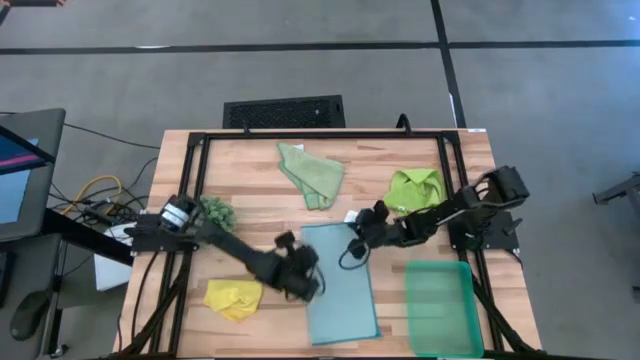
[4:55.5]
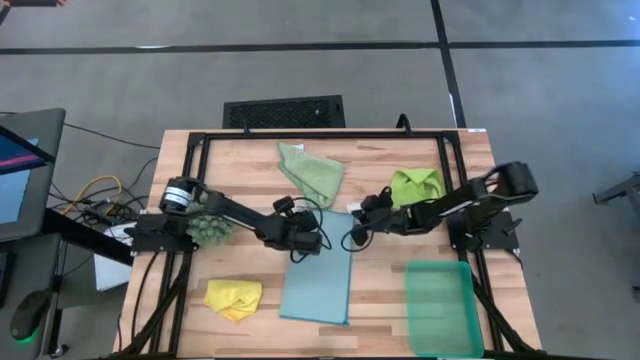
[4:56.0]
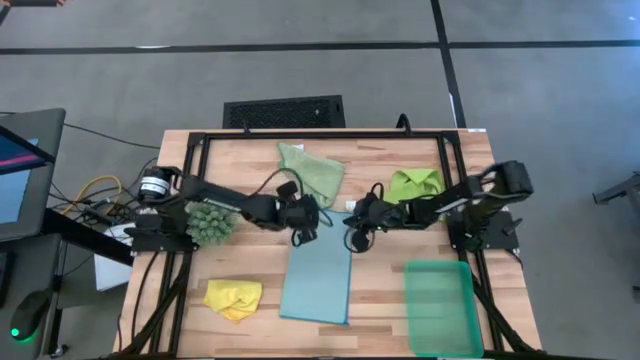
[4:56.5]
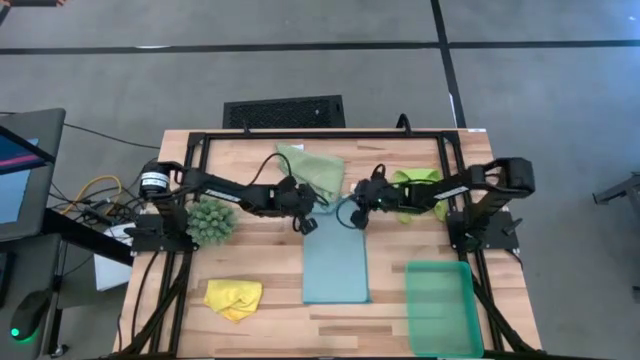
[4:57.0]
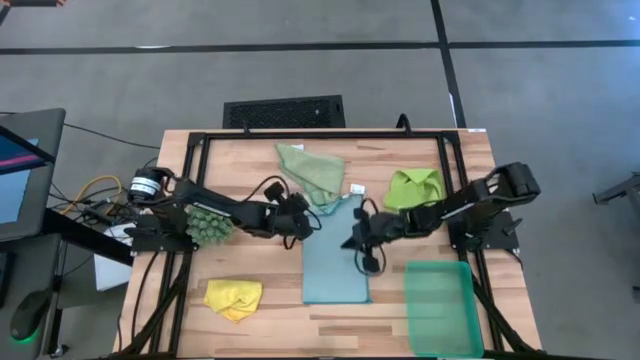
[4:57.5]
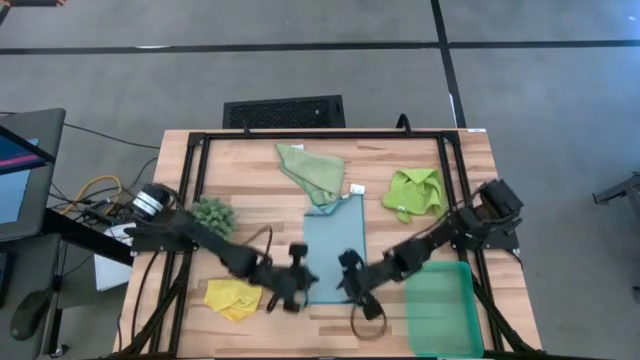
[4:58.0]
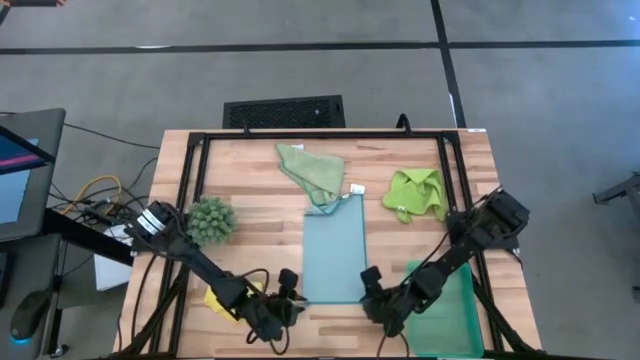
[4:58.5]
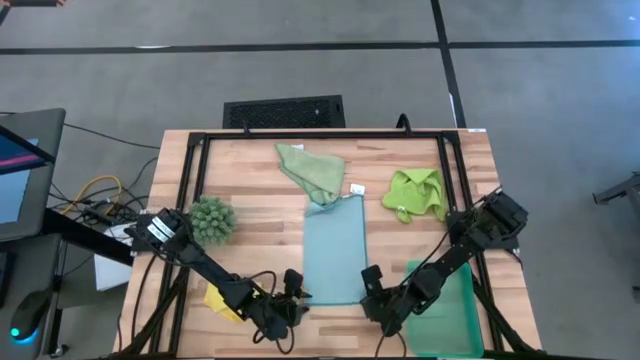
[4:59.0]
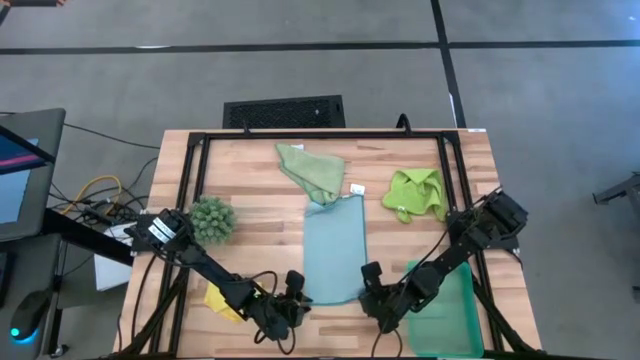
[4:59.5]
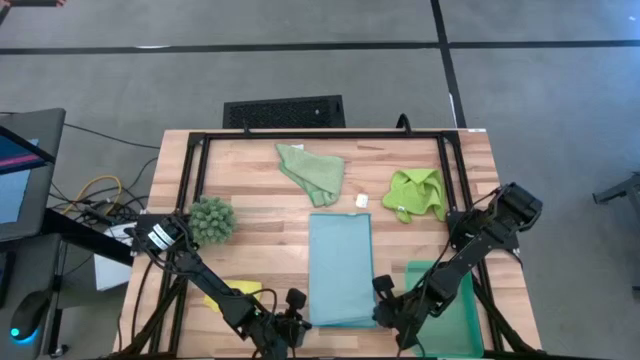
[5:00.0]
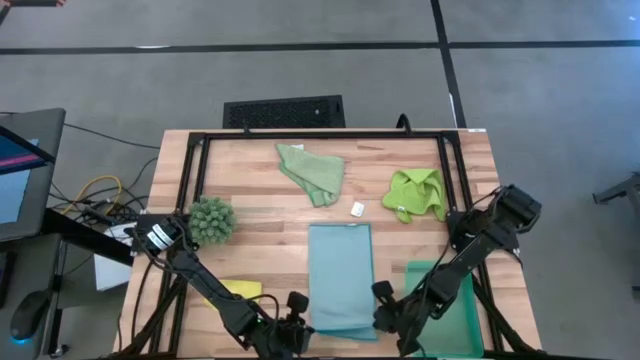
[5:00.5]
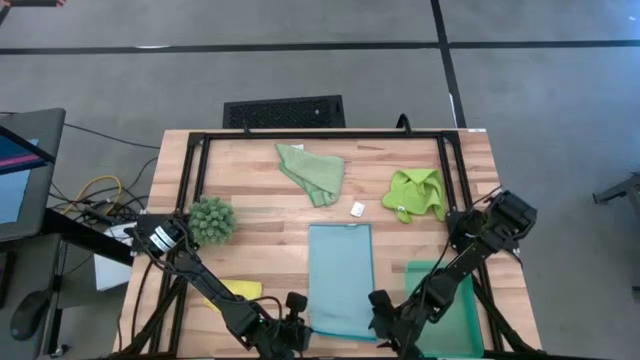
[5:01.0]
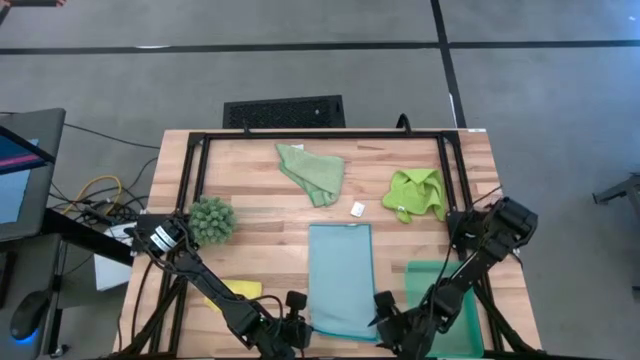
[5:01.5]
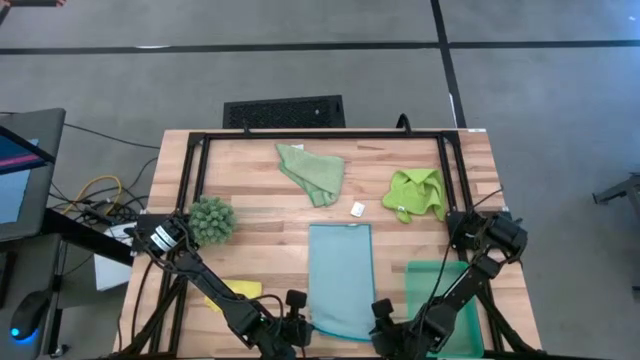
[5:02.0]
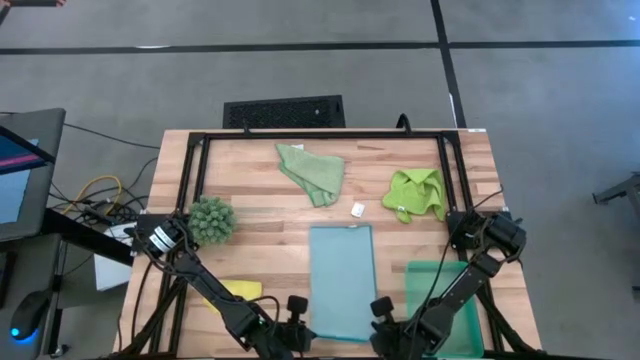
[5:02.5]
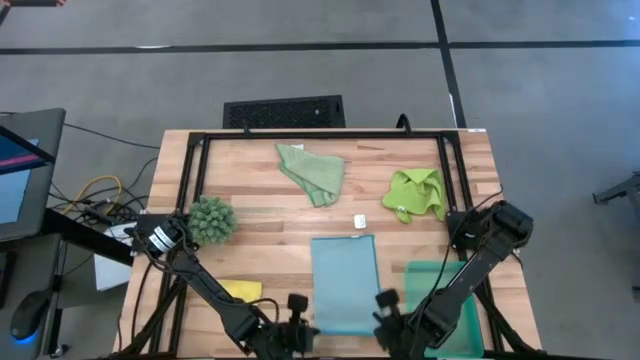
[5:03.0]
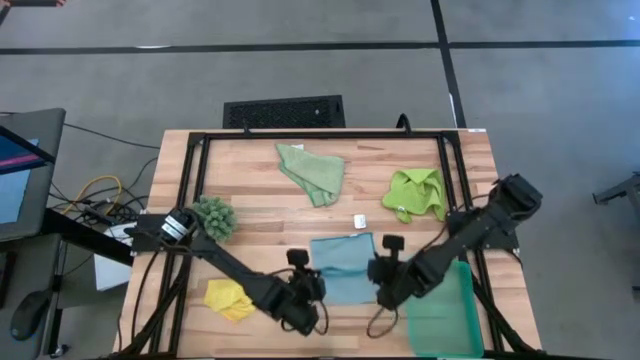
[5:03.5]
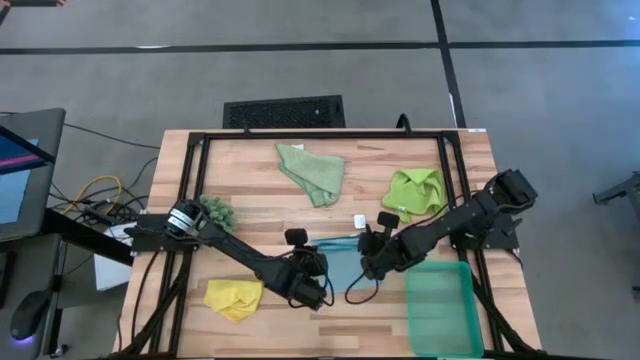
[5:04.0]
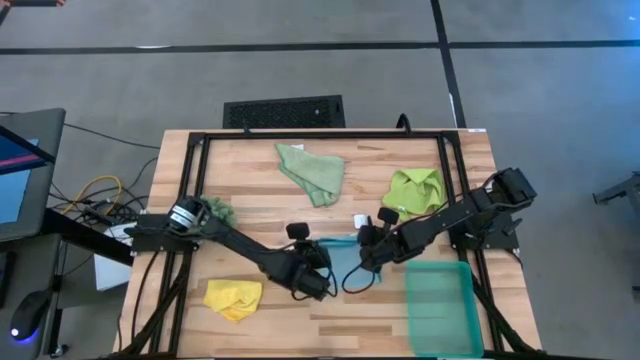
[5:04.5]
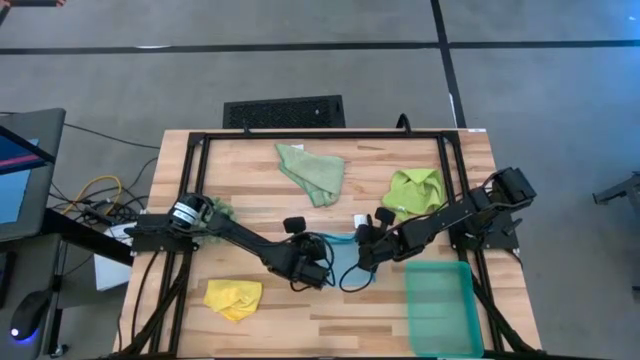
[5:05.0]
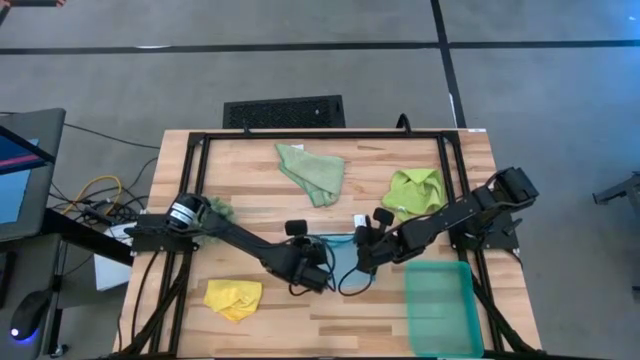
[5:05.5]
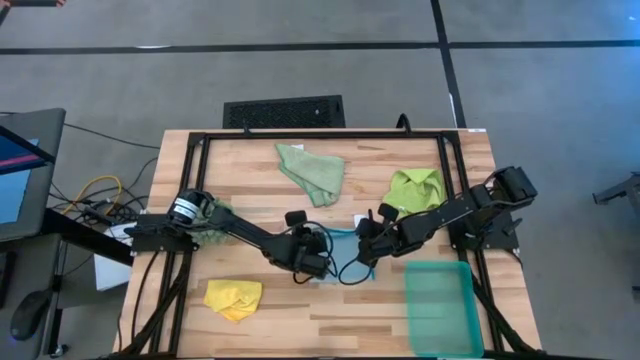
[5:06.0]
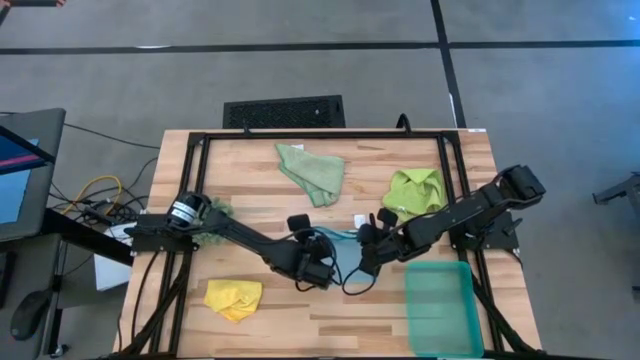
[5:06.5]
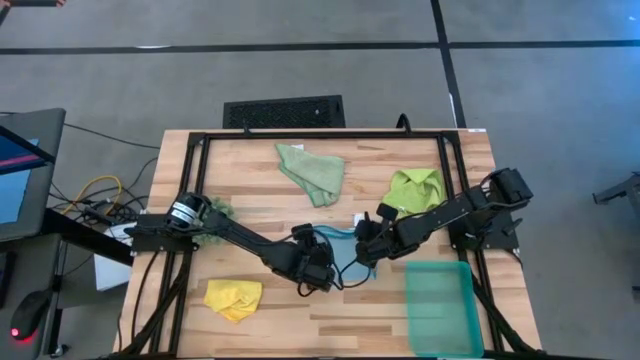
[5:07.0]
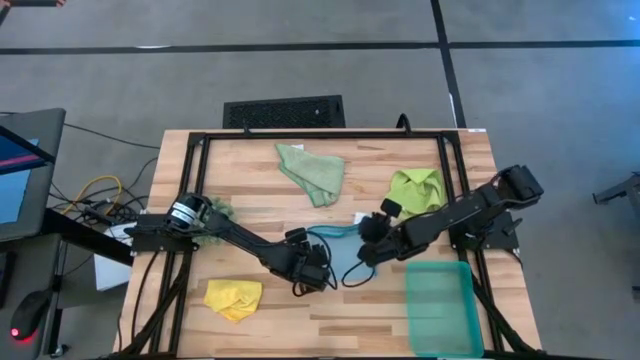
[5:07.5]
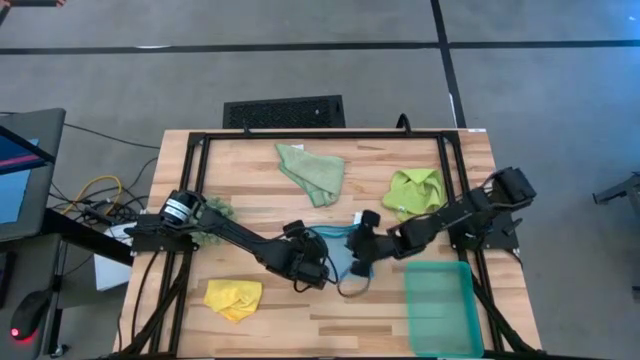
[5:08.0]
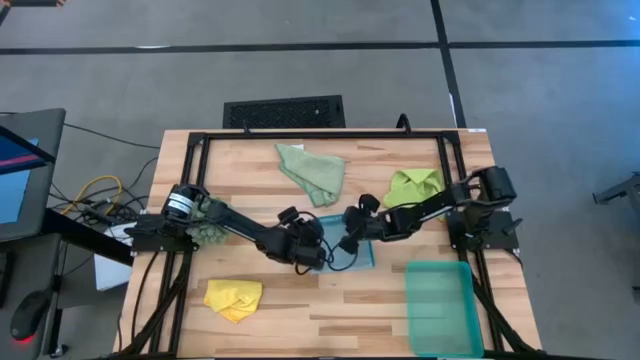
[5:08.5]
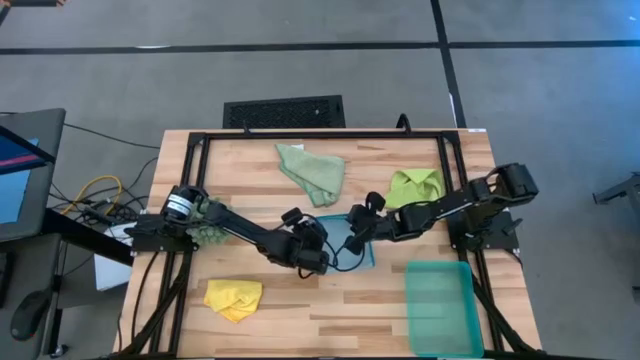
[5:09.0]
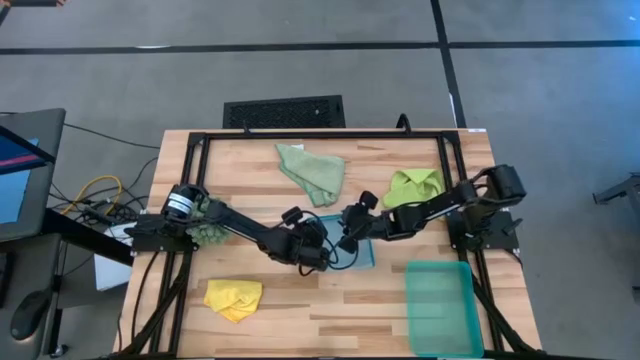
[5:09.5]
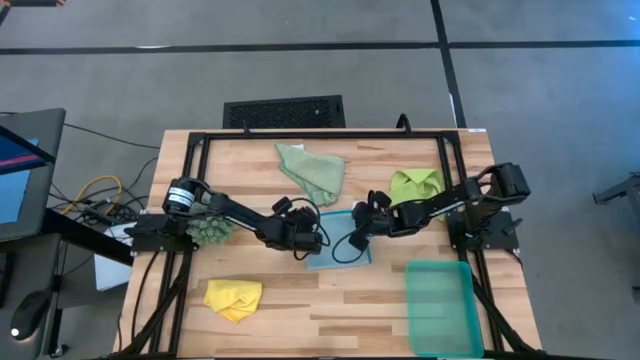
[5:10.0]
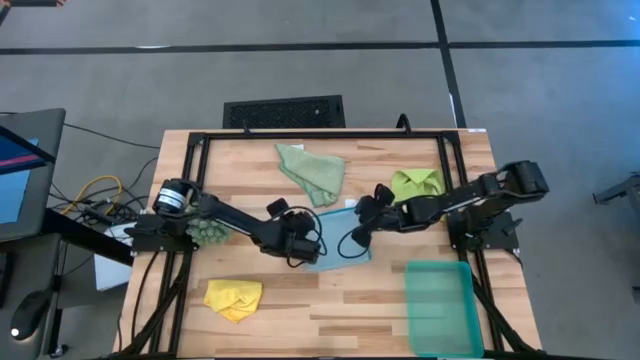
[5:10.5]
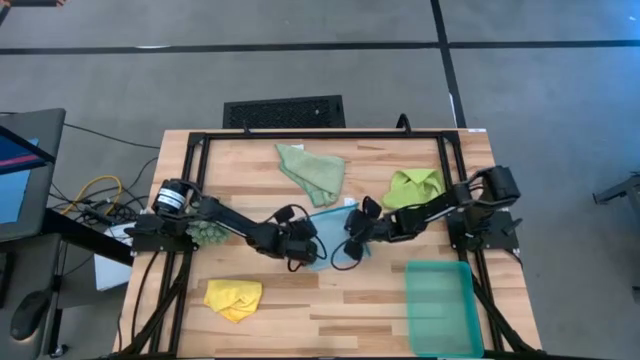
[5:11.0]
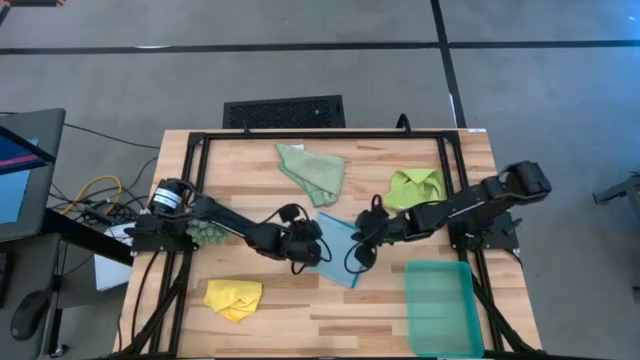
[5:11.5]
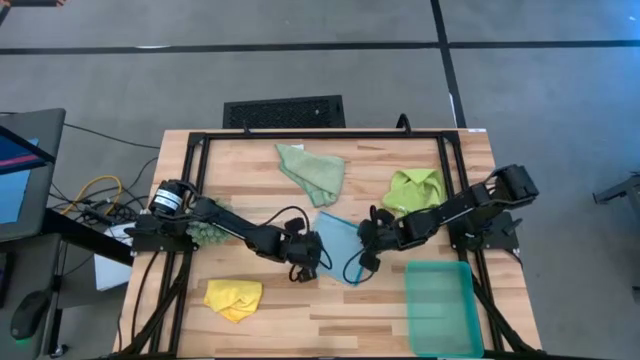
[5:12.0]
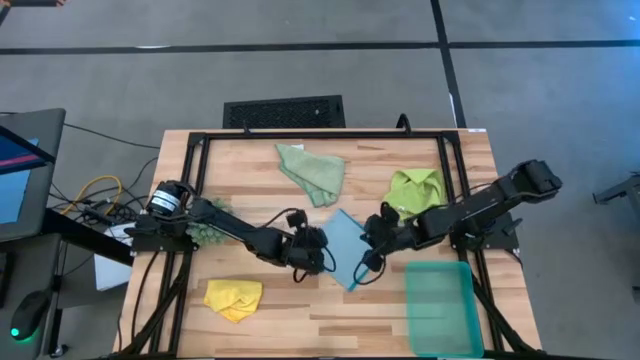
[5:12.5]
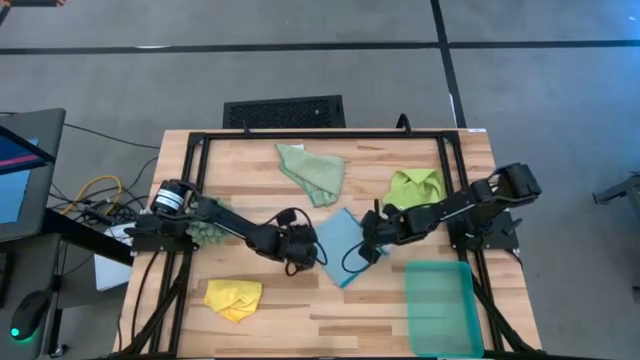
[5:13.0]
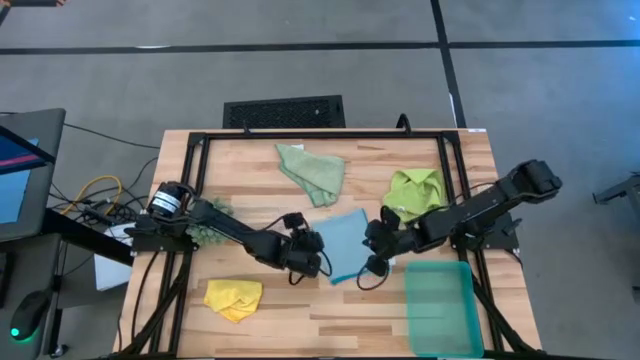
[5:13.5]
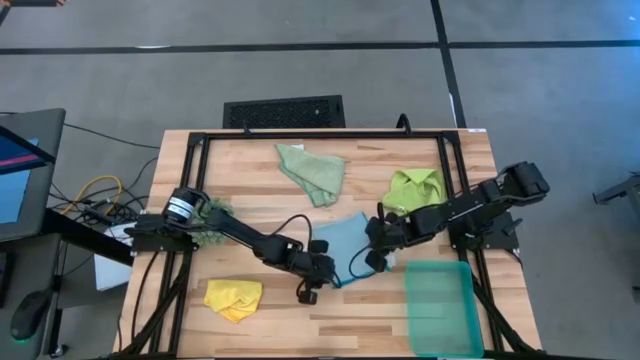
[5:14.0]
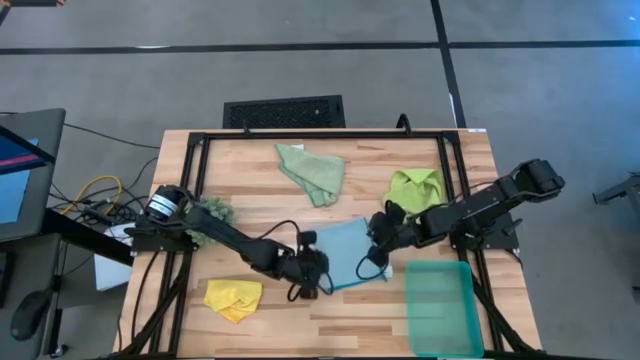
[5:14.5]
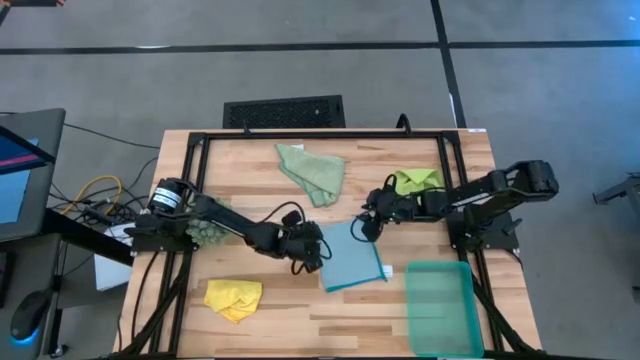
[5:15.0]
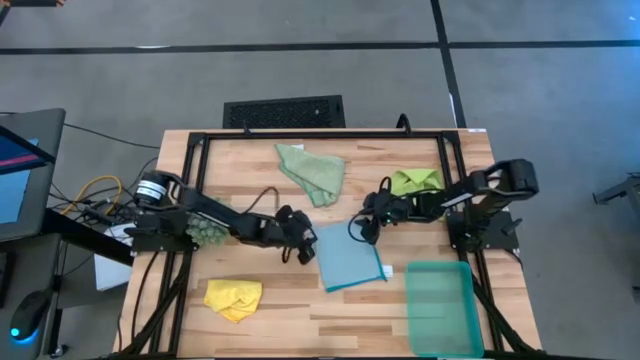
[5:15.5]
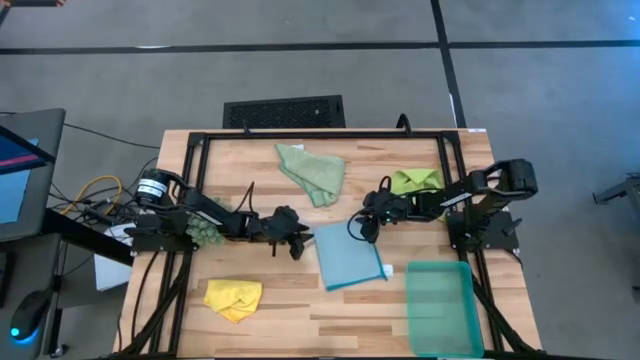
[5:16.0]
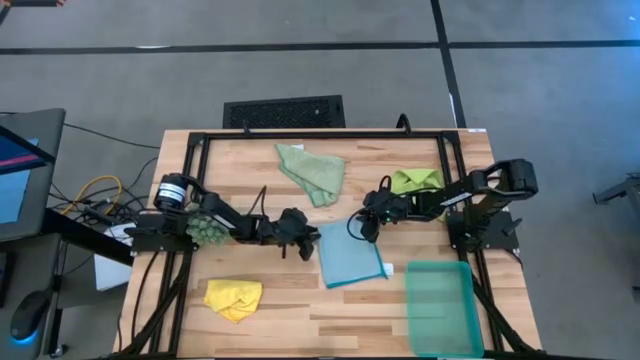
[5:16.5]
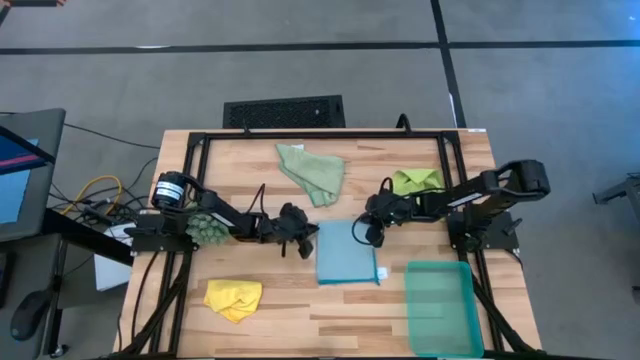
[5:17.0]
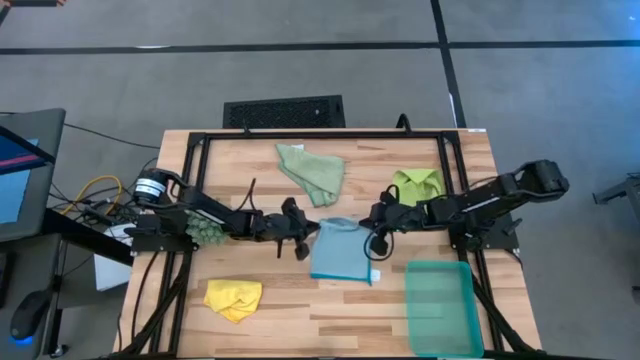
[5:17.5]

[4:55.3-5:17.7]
Task: Fold microfiber towels
Fold the blue microfiber cloth
